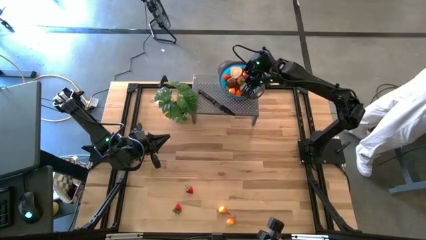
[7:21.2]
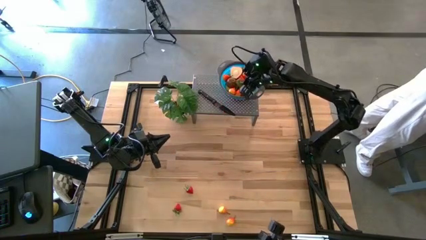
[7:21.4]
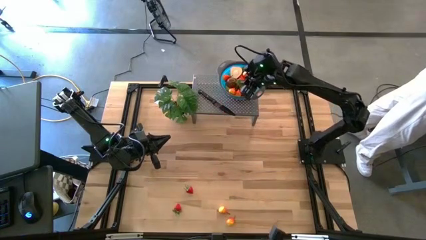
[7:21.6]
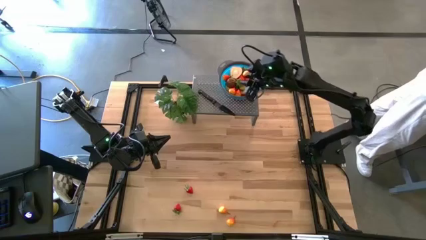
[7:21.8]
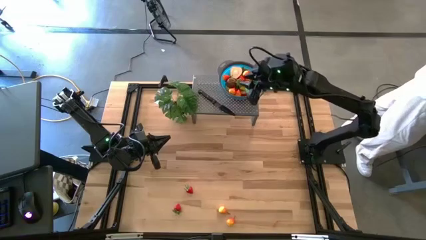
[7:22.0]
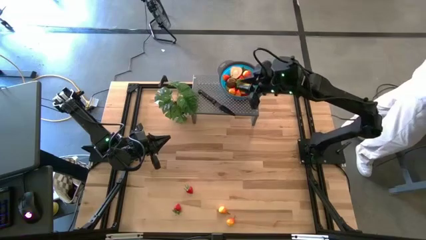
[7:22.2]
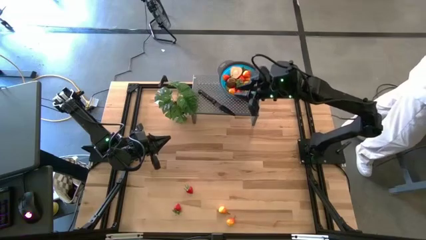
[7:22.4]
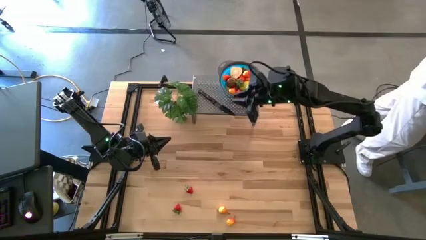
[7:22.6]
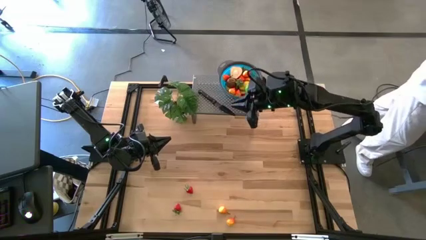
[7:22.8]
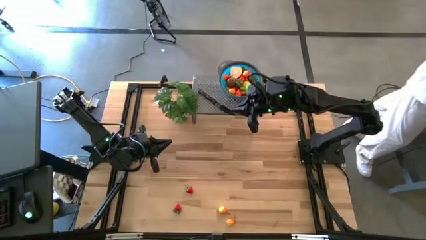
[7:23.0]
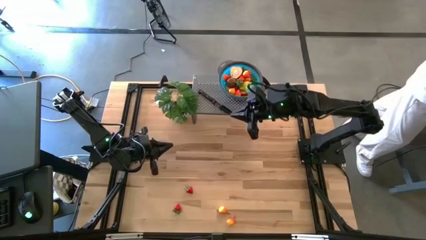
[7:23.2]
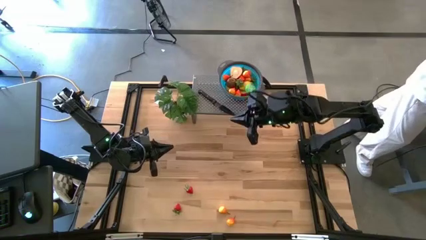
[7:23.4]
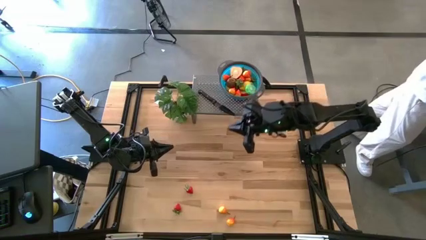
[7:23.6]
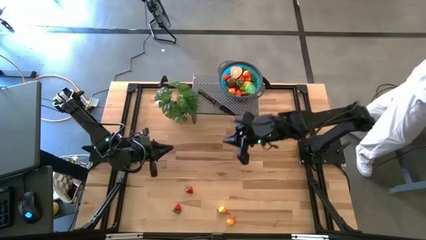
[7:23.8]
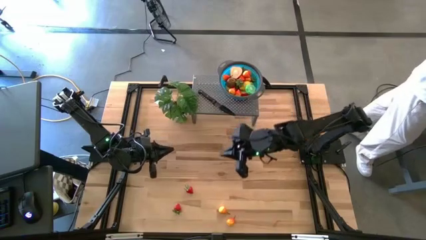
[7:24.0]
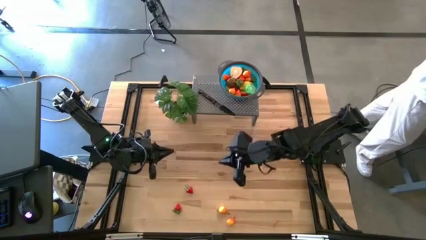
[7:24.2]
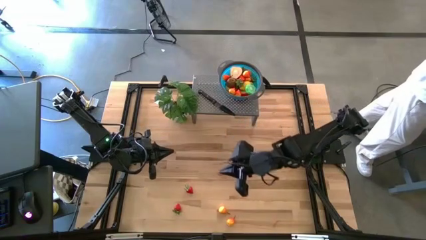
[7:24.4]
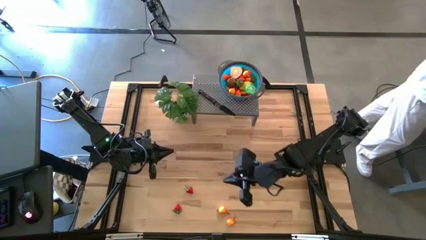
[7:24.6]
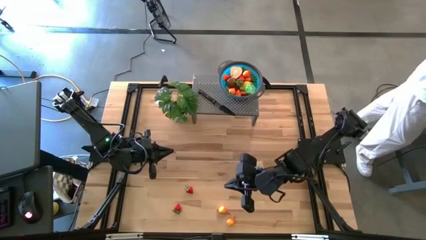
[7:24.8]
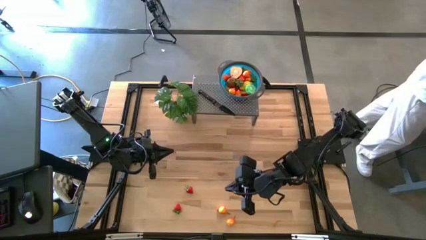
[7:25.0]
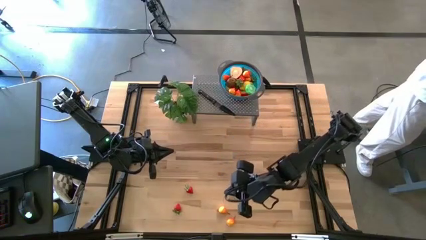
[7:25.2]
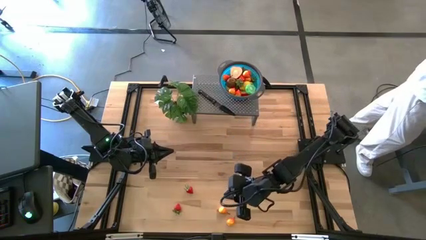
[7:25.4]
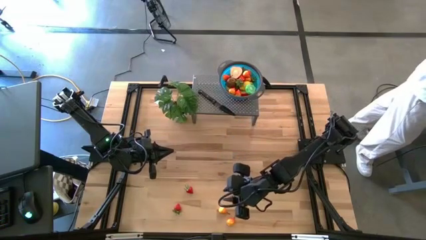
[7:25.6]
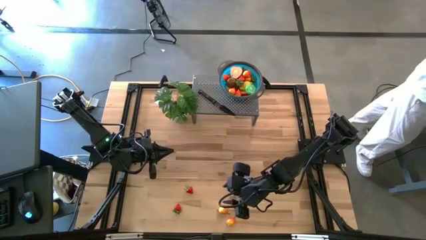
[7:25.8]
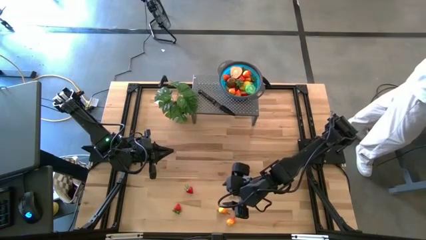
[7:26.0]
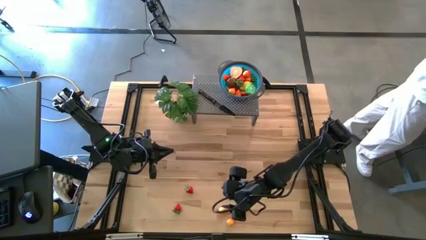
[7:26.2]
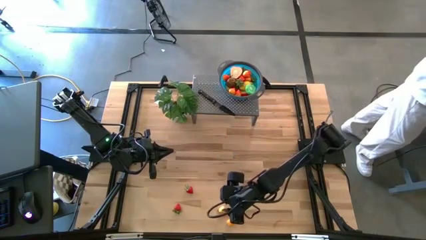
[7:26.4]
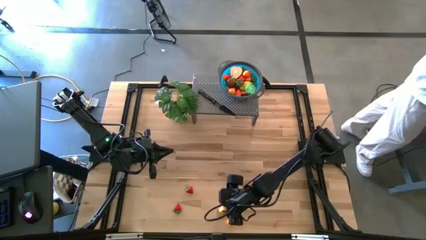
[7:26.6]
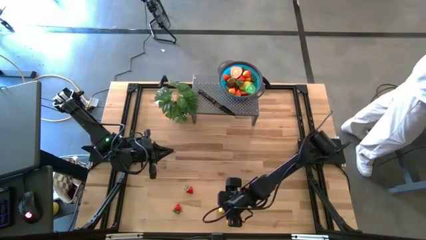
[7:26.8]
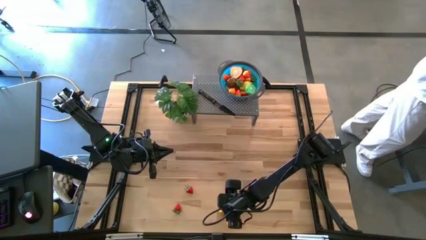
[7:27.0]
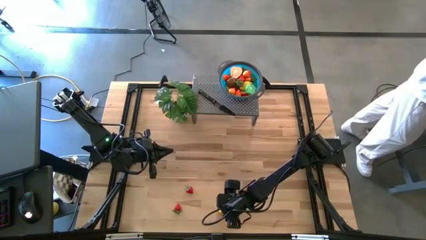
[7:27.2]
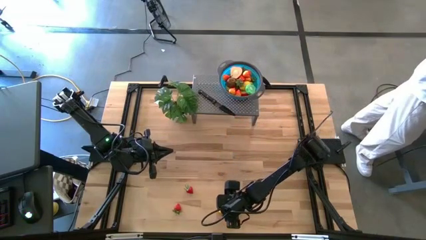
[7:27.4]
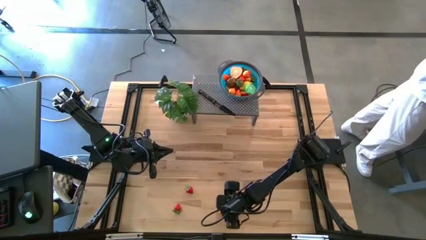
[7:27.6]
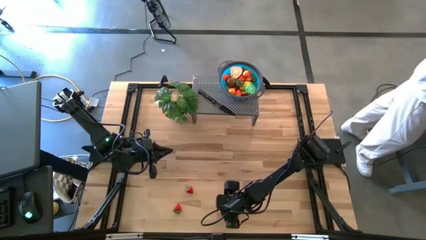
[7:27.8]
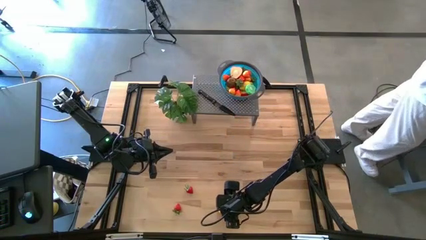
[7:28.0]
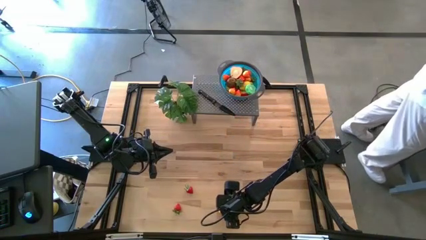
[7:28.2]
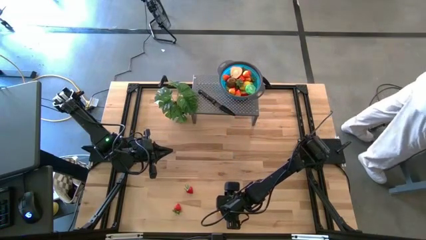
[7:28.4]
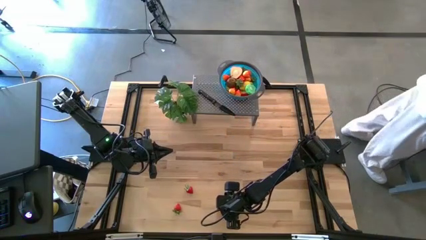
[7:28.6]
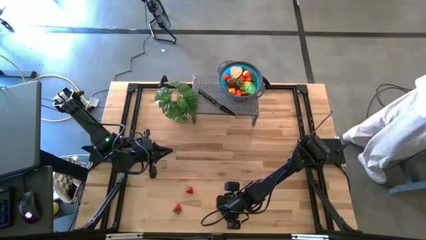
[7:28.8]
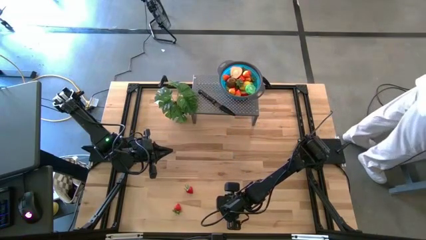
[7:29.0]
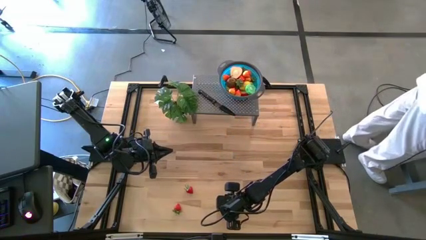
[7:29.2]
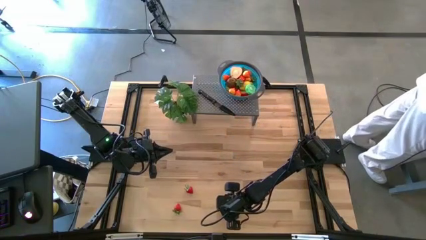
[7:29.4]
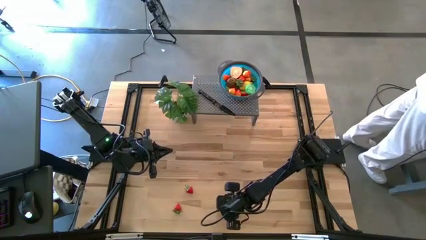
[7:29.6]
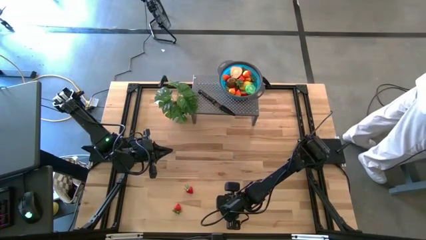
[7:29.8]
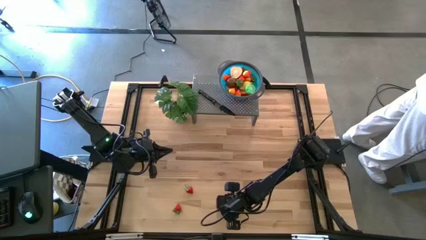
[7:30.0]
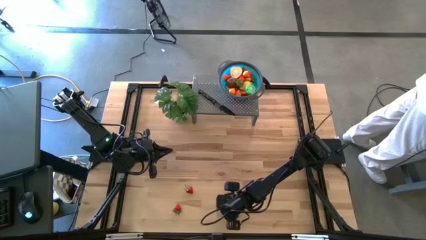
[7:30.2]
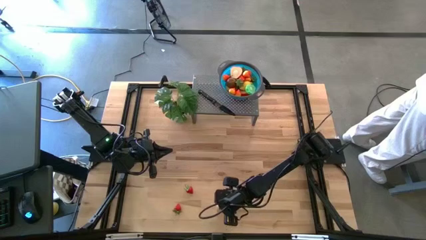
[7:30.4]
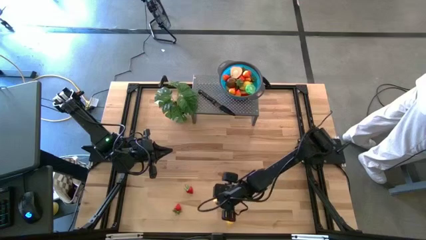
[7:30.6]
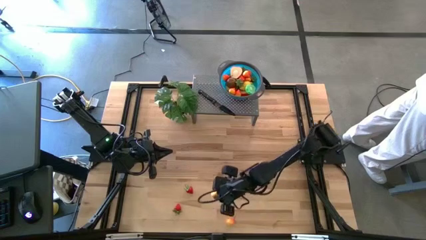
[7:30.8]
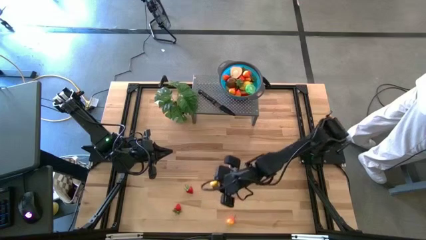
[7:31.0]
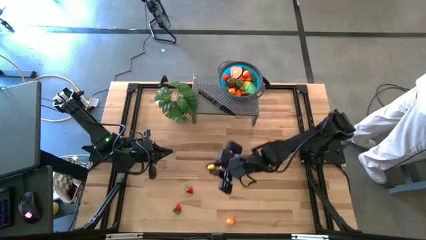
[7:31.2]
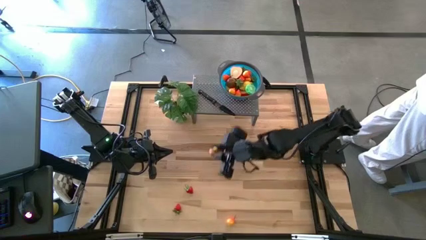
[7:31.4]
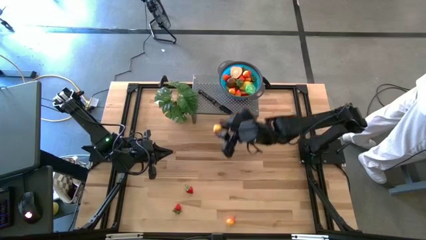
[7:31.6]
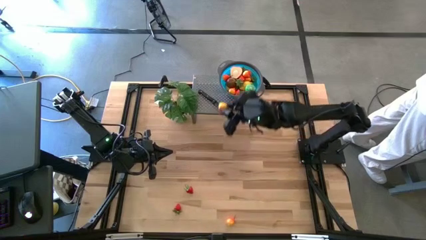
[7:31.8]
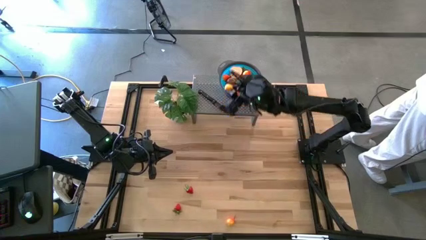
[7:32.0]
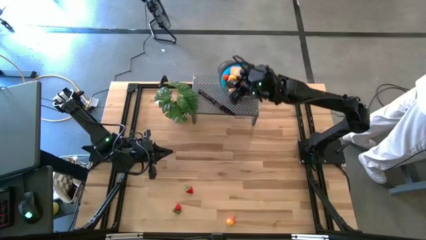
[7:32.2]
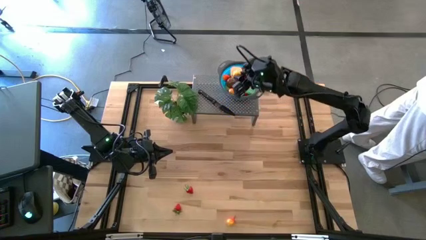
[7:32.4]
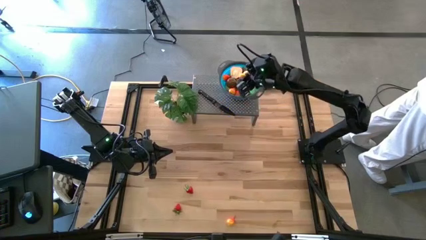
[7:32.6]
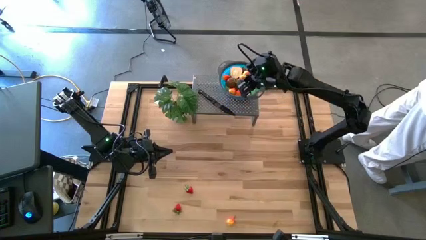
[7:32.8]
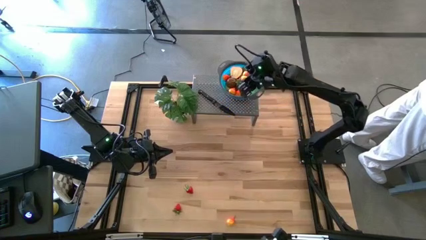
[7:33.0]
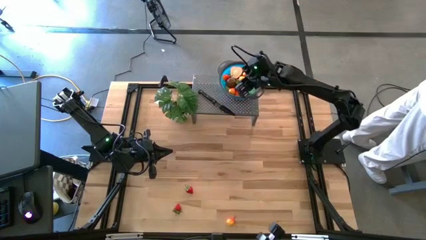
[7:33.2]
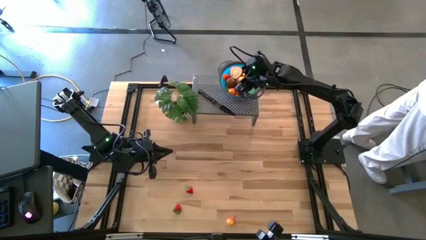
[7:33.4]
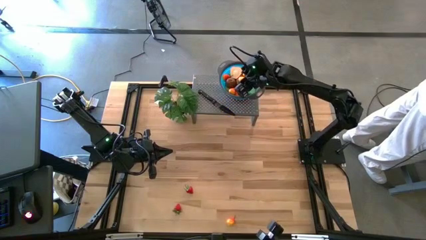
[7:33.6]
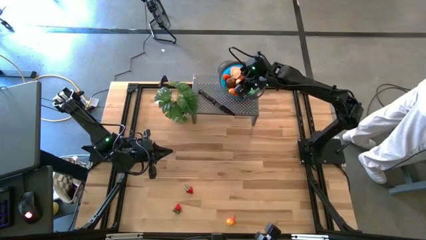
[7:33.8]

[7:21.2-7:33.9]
Task: Pick & Place Fruit
Put the yellow pear in the blue bowl on the shelf

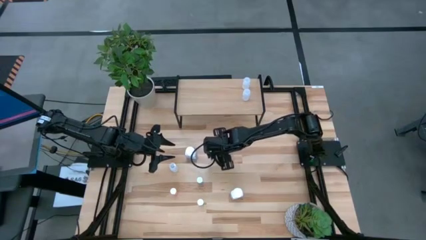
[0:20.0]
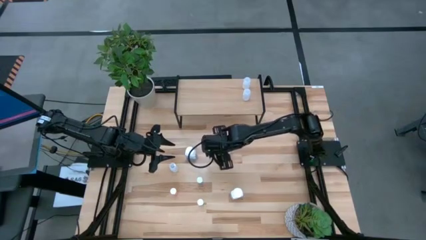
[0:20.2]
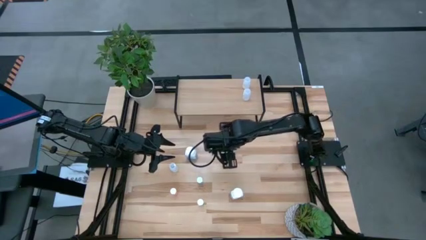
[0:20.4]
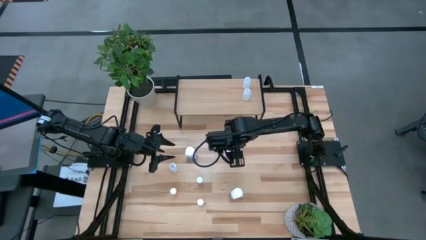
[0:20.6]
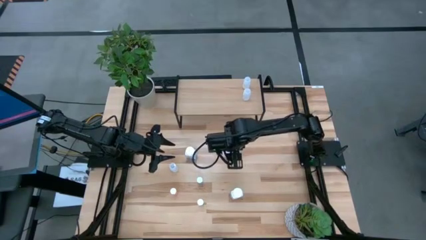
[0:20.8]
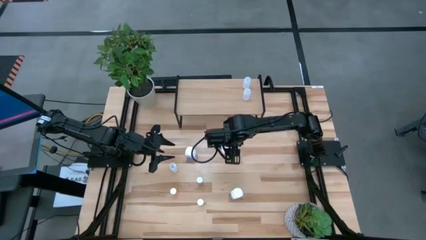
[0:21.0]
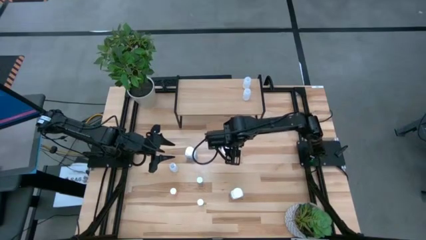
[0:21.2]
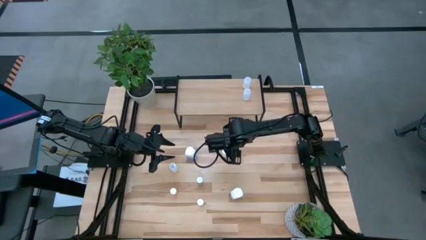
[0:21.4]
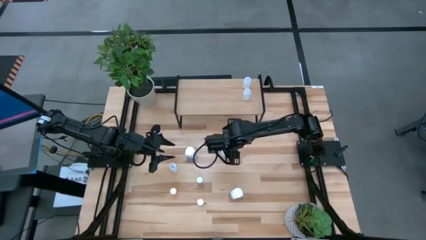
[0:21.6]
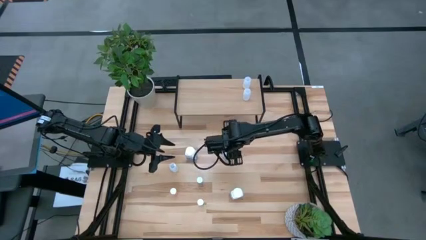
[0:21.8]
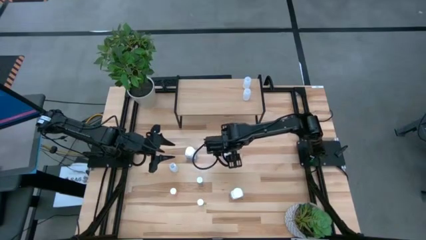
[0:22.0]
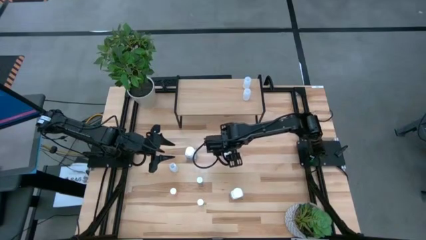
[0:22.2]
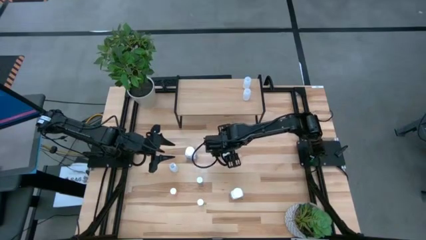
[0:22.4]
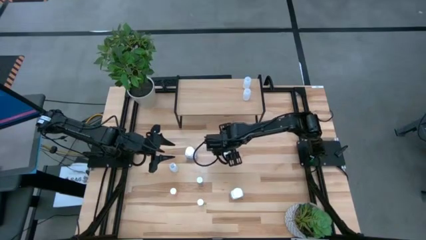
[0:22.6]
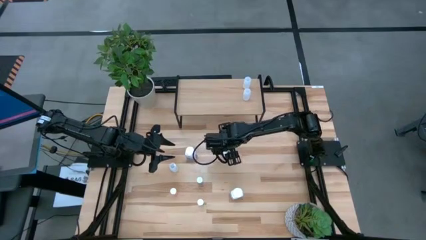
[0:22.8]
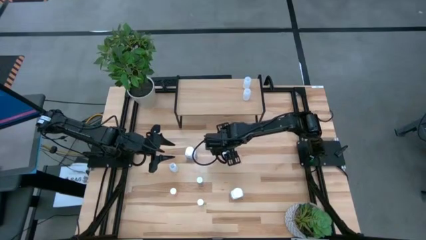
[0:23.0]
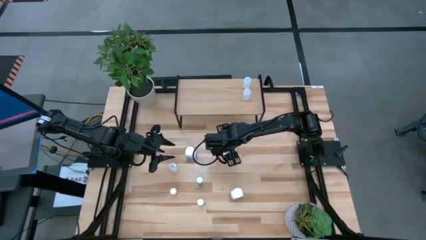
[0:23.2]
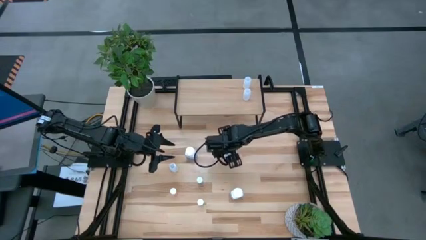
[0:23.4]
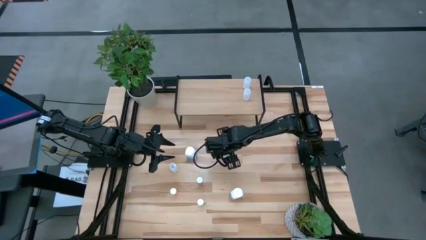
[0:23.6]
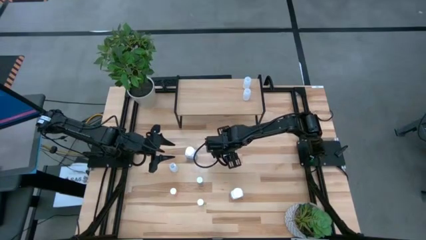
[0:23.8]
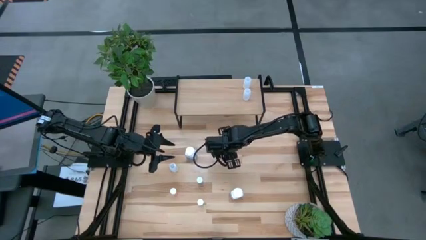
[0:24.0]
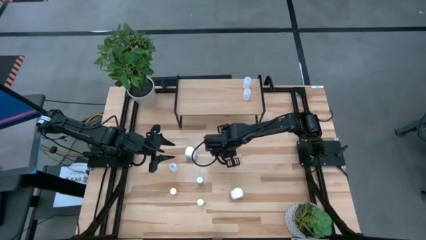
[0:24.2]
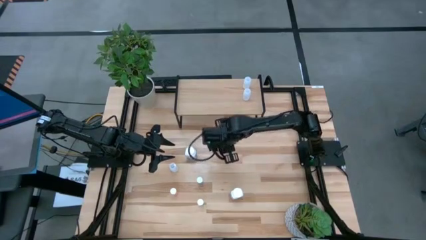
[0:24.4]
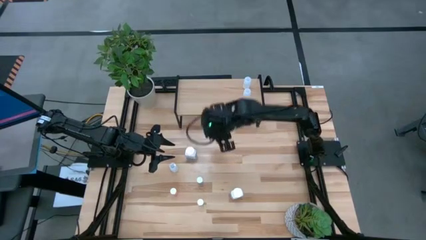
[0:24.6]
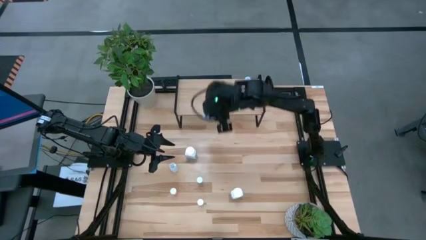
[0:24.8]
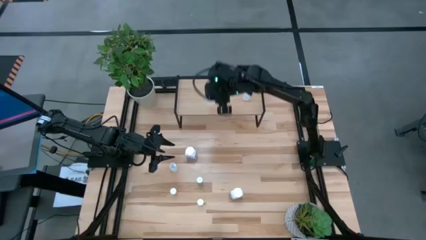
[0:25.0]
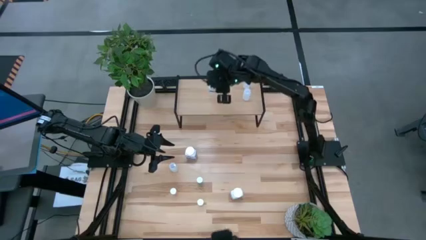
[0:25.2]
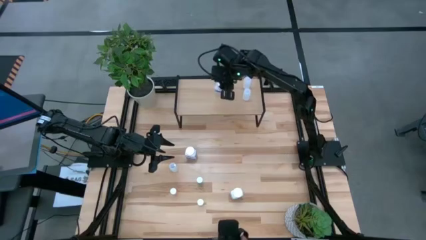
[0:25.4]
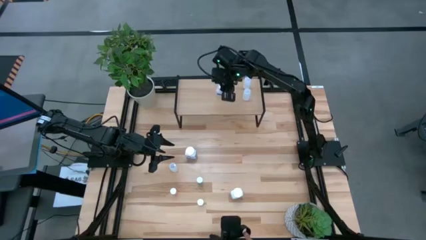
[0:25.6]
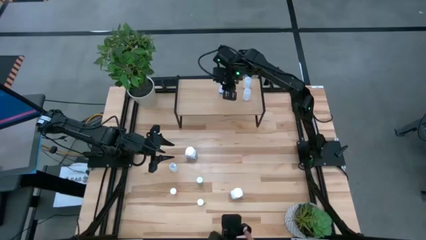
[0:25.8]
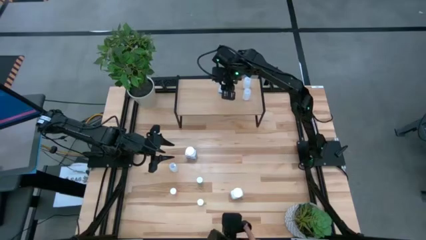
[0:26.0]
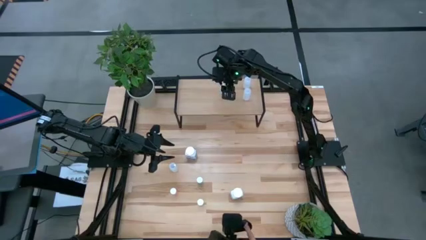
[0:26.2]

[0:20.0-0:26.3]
Task: Pick and place medicine bottles onto shelf by color
Put the top right white and blue bottle on the shelf
